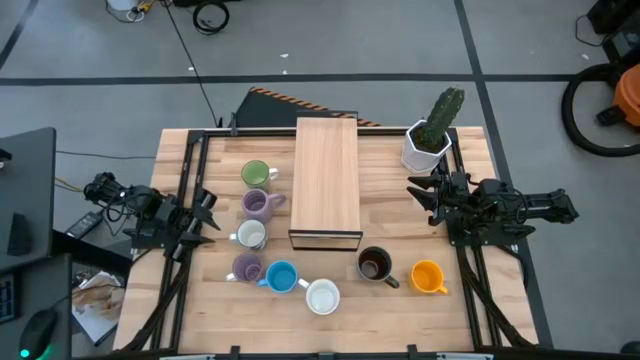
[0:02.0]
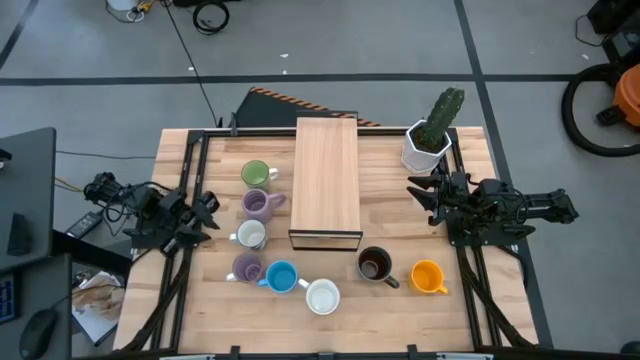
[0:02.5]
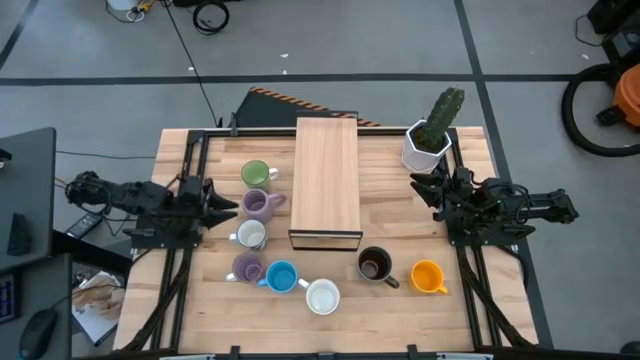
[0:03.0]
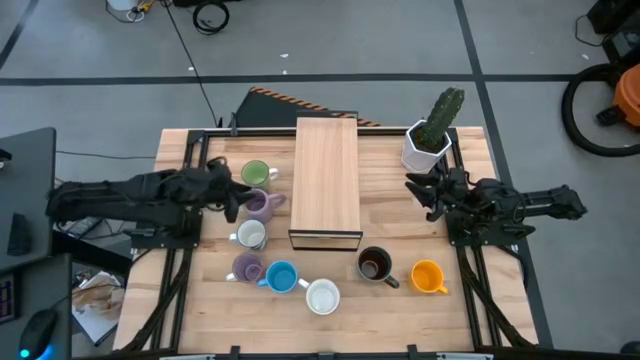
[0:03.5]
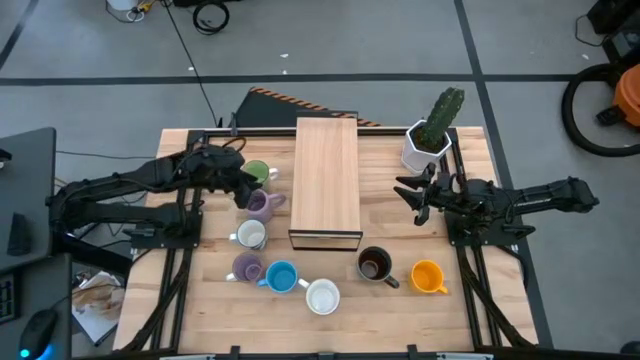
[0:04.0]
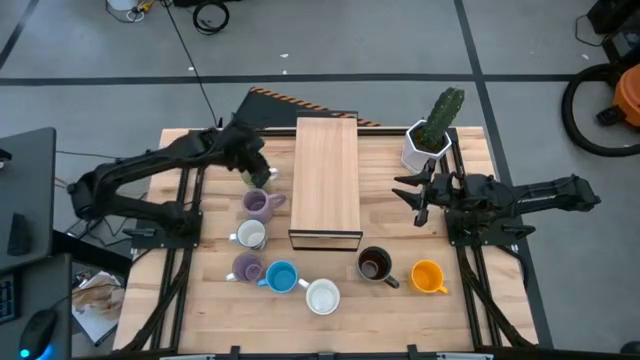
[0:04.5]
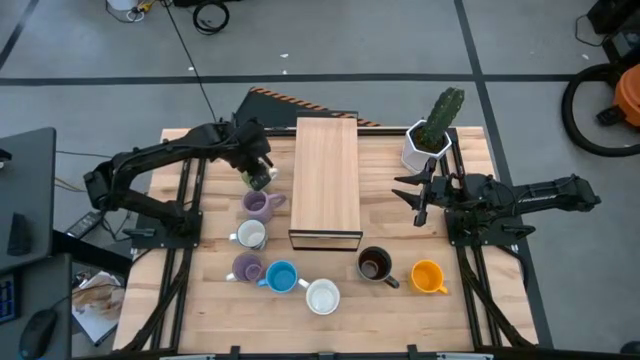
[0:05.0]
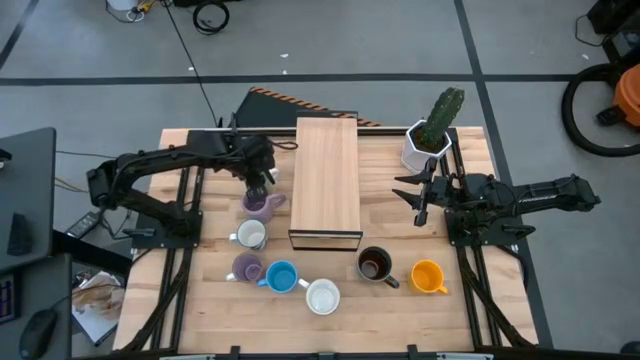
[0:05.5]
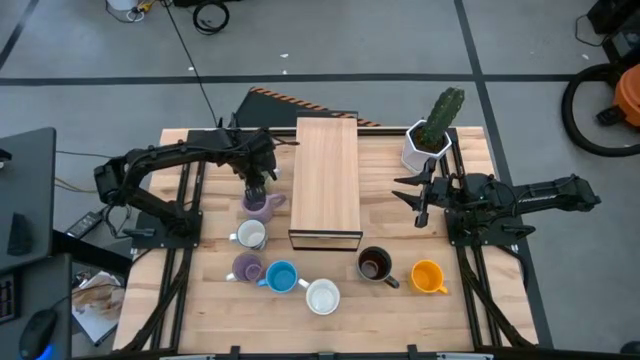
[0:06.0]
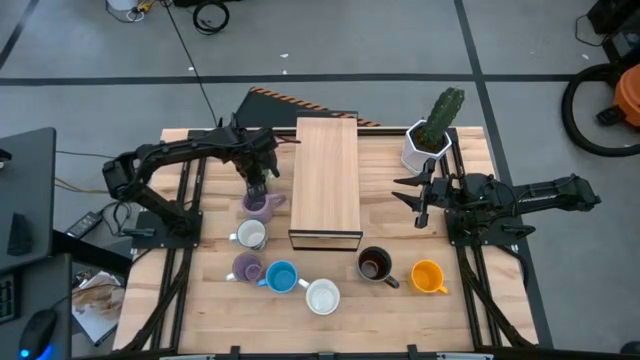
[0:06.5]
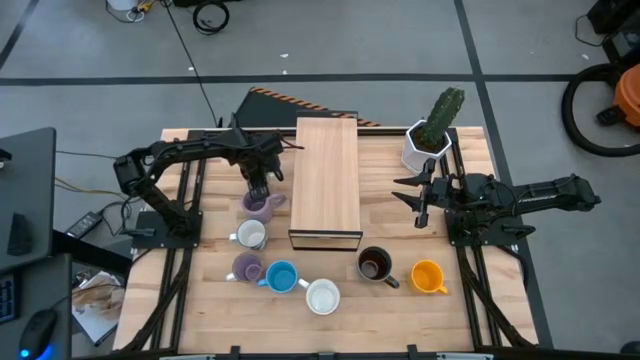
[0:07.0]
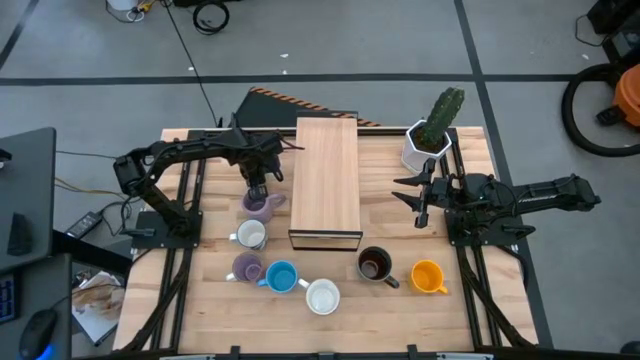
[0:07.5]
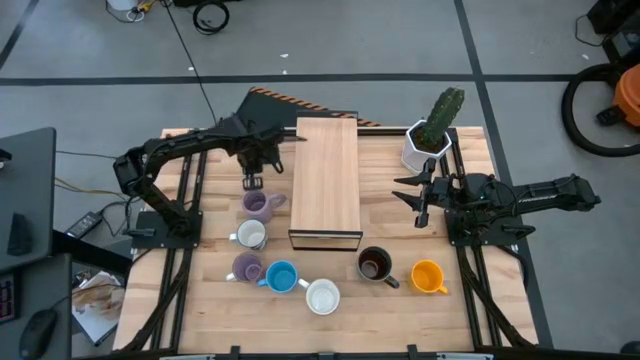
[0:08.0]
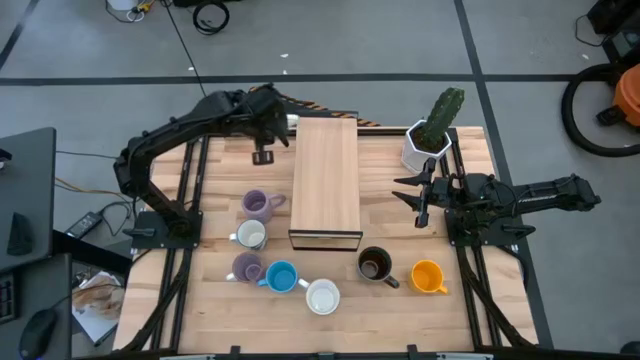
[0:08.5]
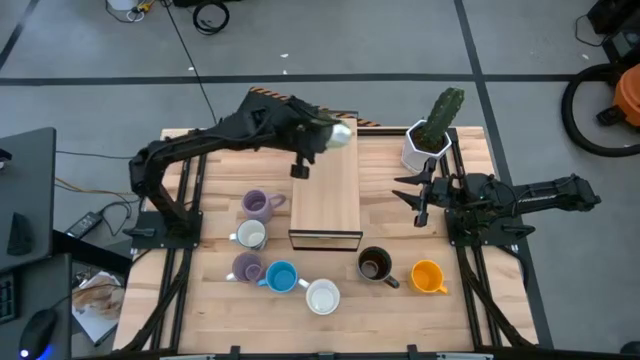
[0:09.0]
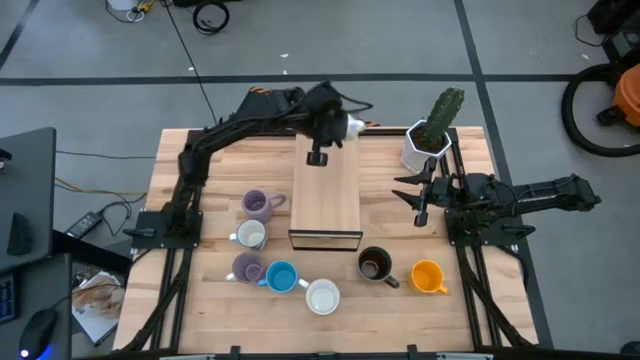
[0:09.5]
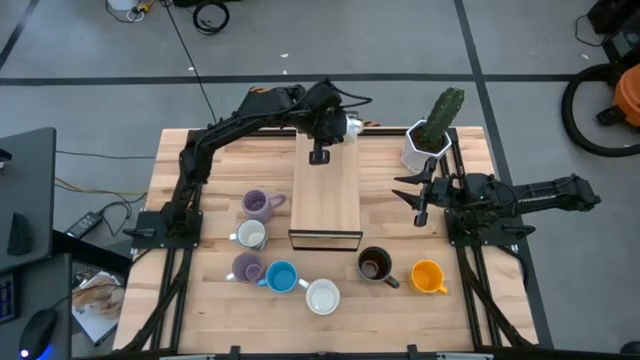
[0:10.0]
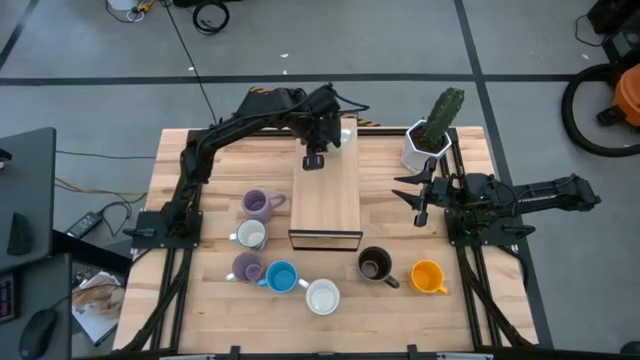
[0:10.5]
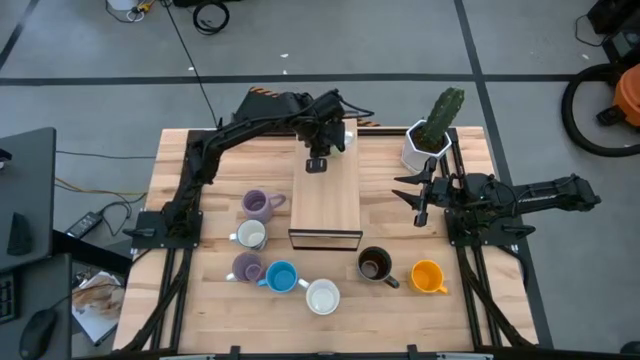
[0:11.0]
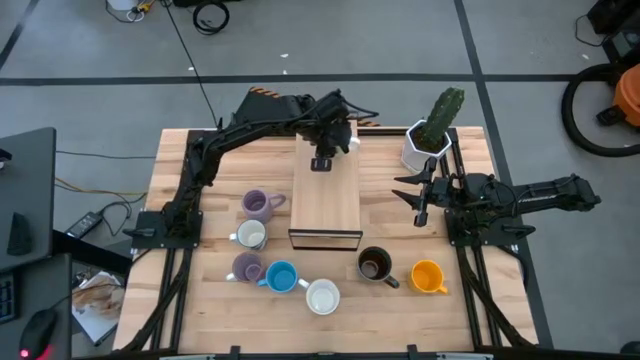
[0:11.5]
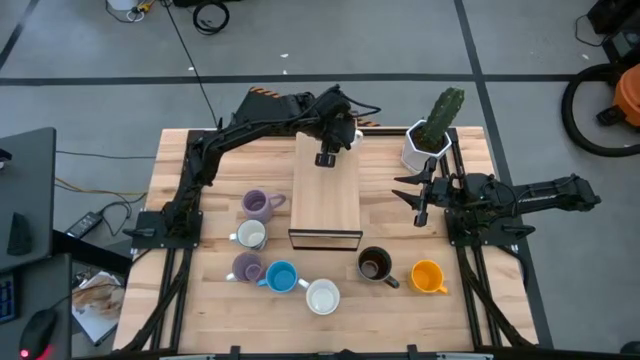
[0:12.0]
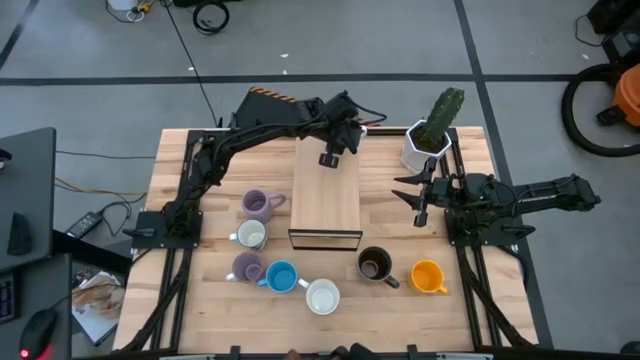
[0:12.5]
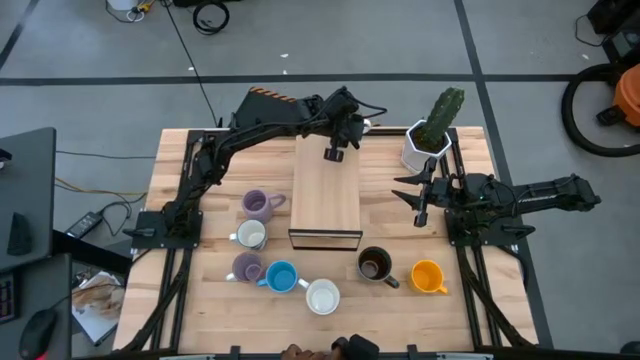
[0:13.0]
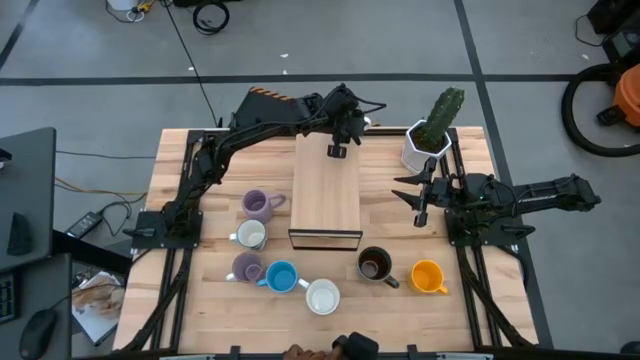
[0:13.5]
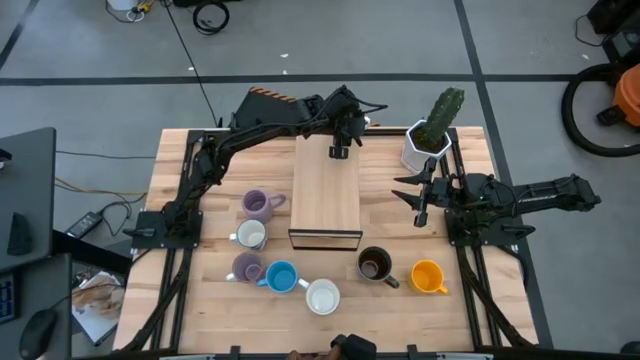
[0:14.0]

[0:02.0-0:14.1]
Task: Place coffee mugs
Put the green mug on the shelf

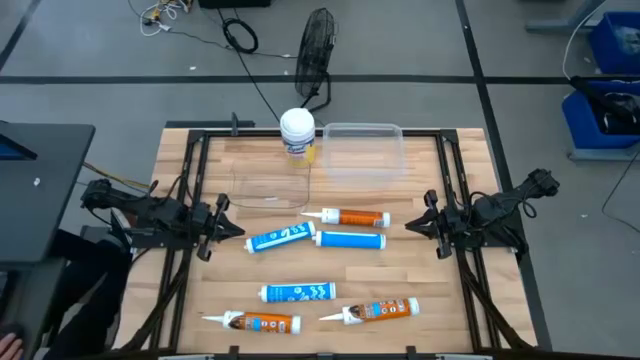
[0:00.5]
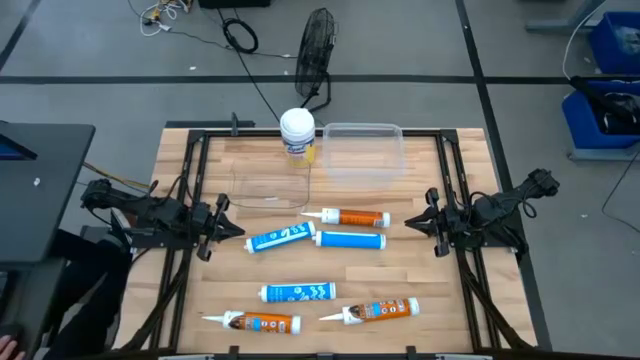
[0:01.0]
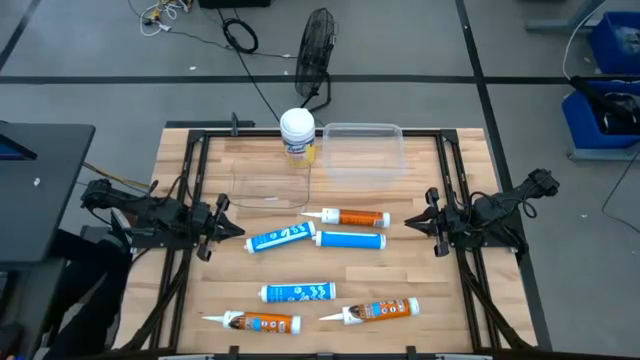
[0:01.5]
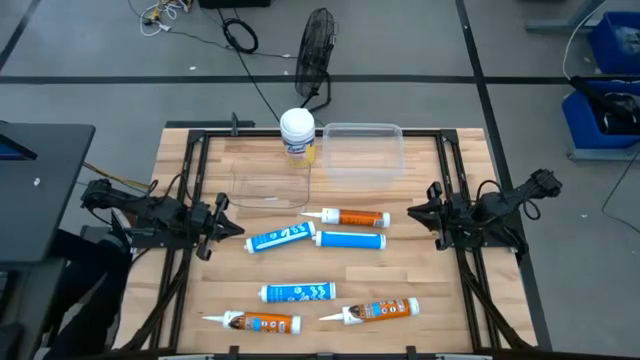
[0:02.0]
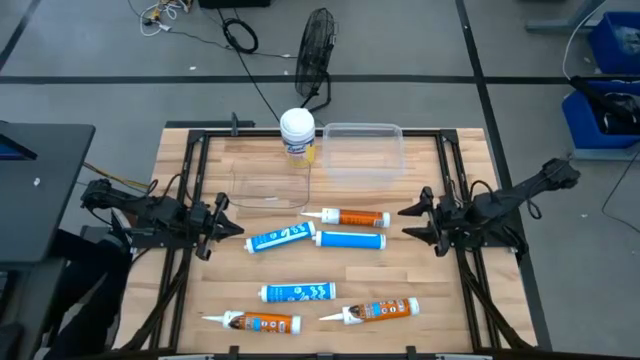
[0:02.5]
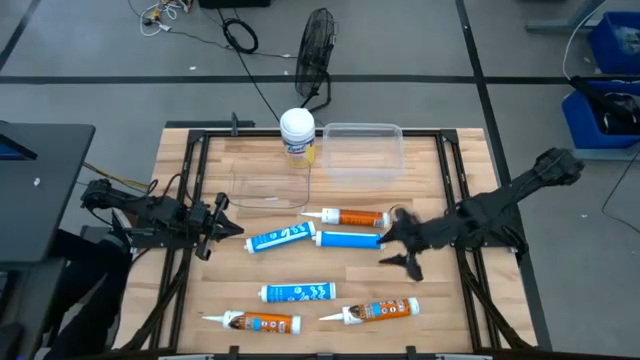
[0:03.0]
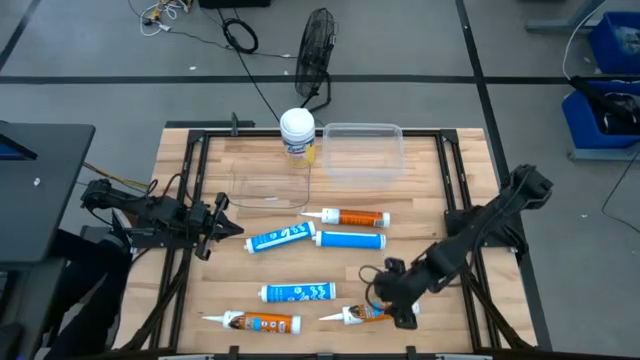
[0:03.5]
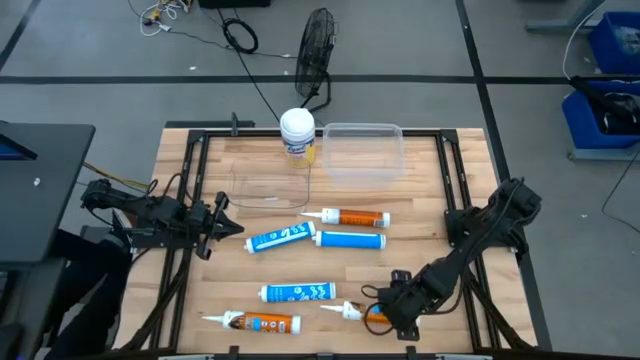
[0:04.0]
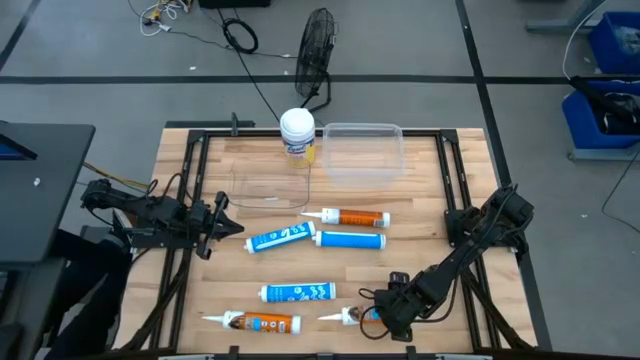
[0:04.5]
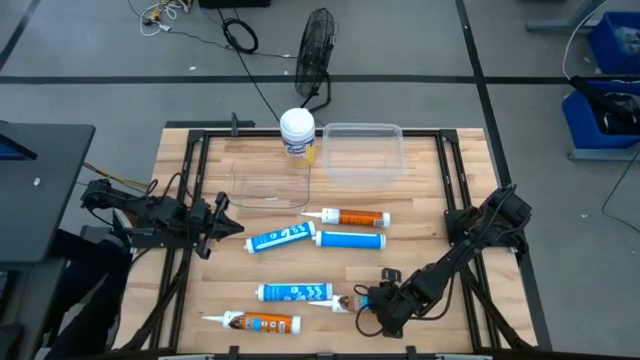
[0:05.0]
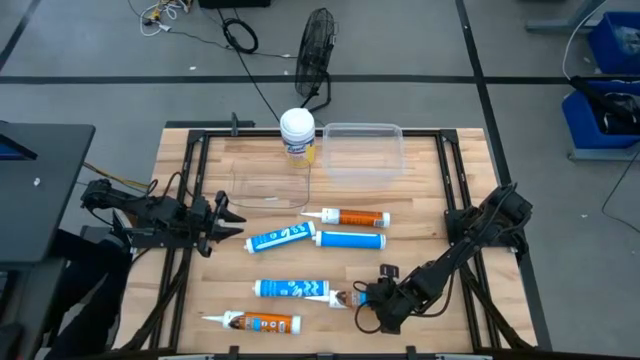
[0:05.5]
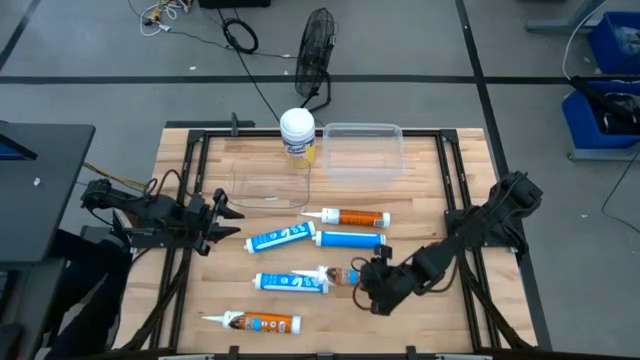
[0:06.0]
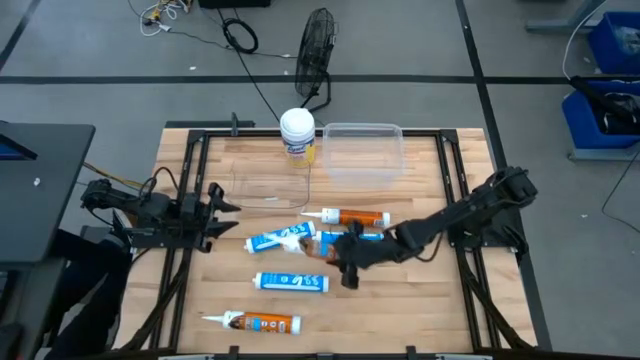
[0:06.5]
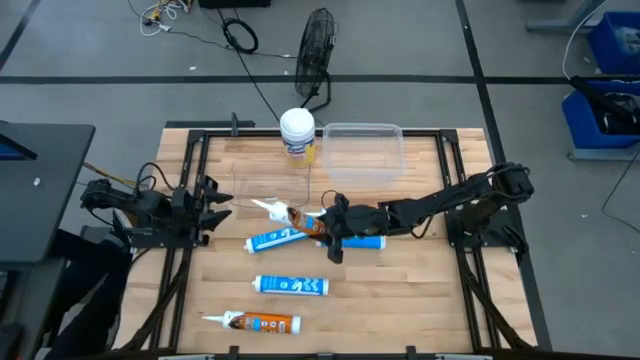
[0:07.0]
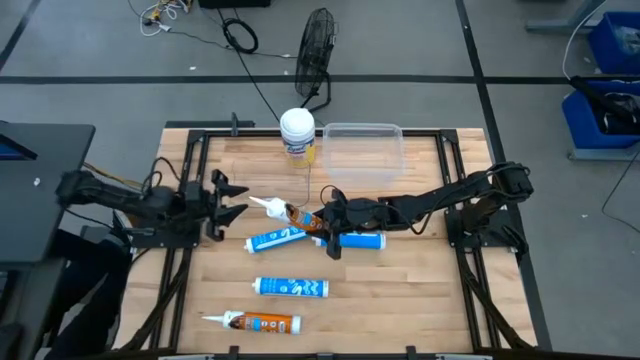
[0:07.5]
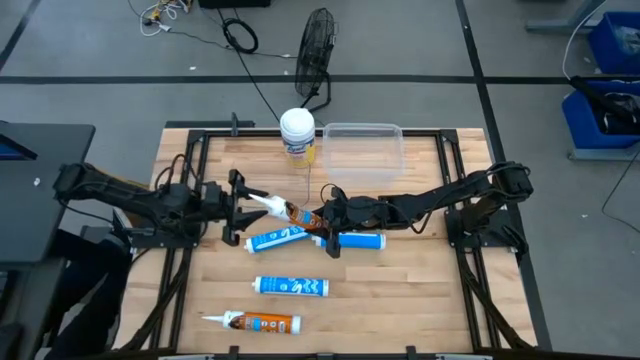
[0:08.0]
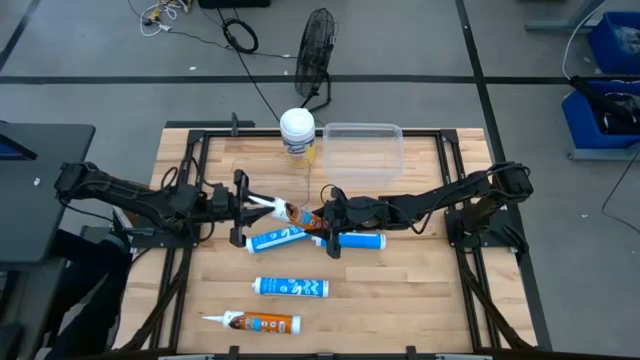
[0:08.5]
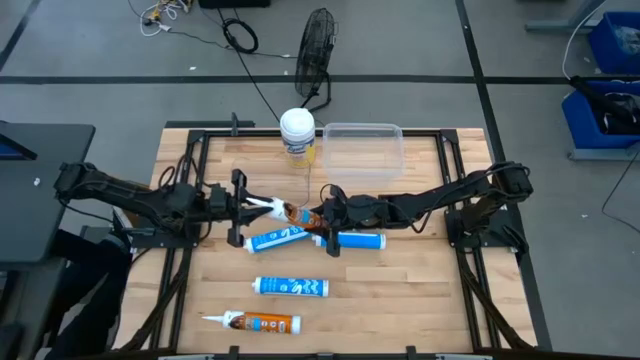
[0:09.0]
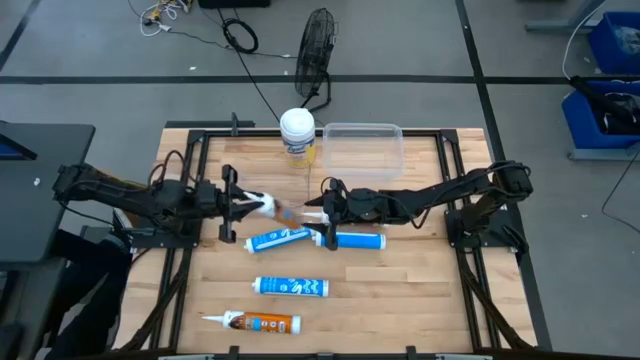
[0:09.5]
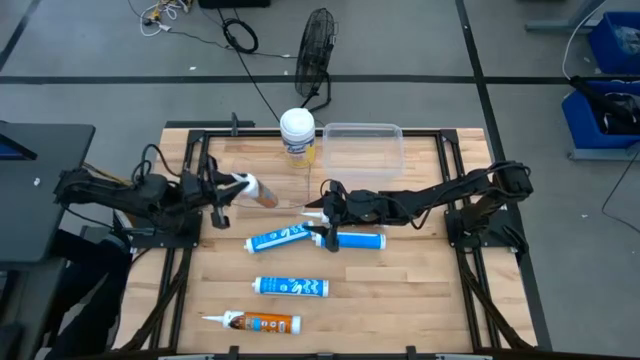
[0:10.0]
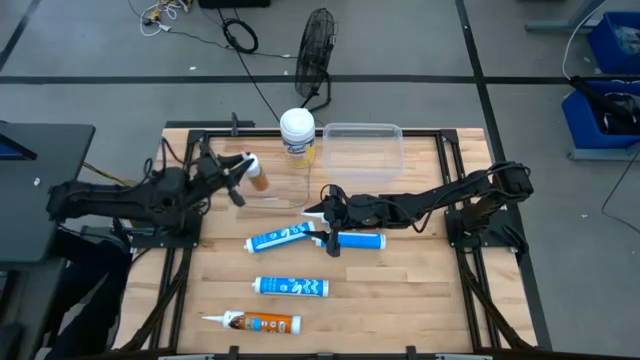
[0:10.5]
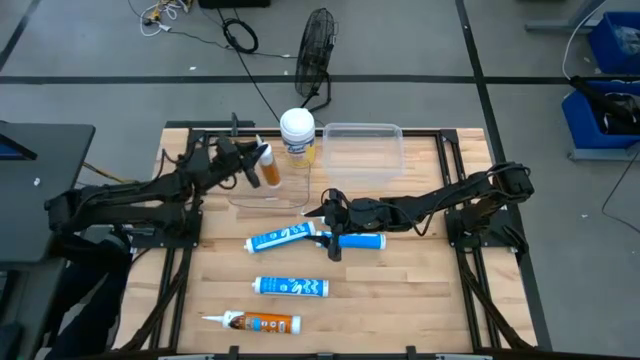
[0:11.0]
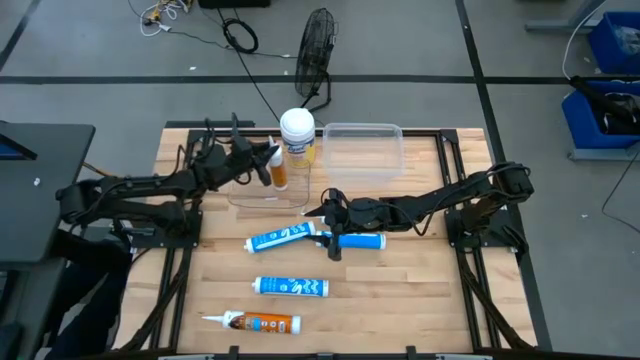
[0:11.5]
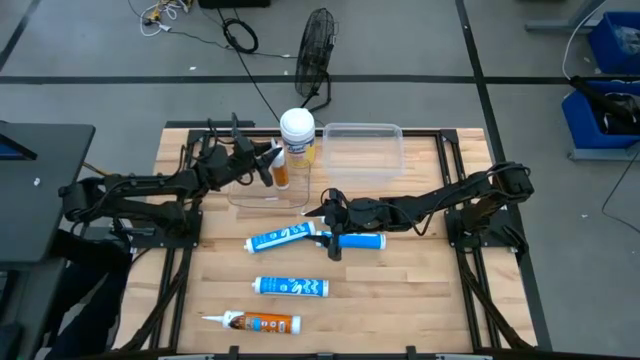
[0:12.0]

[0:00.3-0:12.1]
Task: Pick & place silicon tubes, Sealant and Lysol wipes
Put the bottom right orange sealant into the left transparent bin
